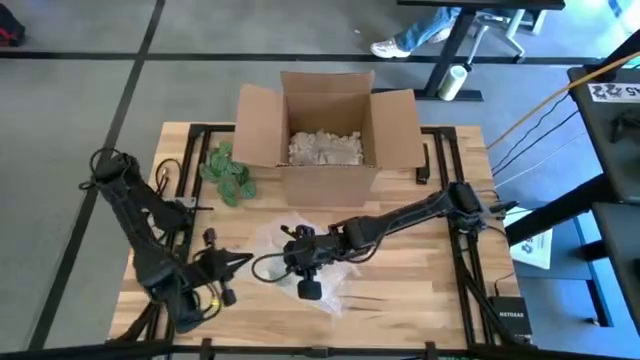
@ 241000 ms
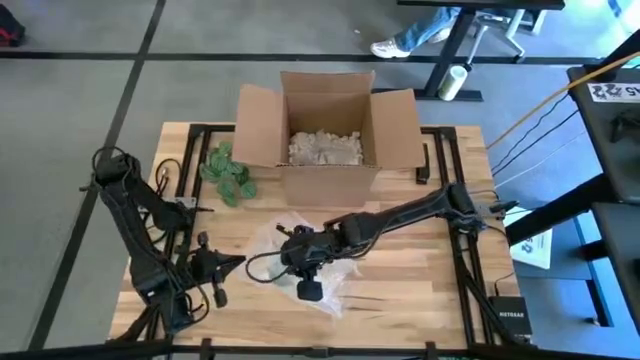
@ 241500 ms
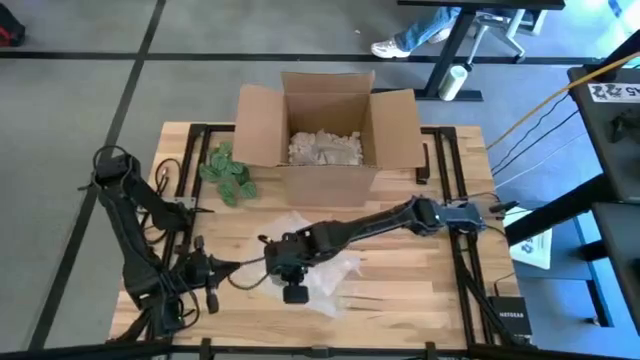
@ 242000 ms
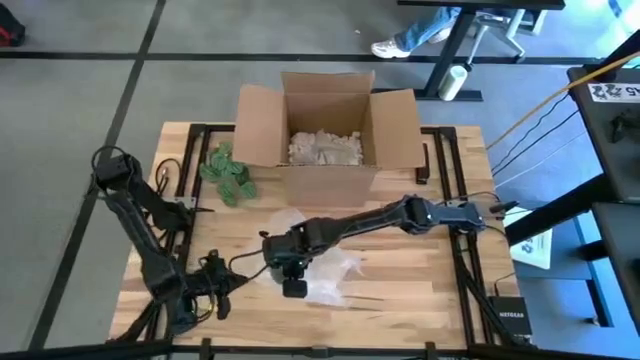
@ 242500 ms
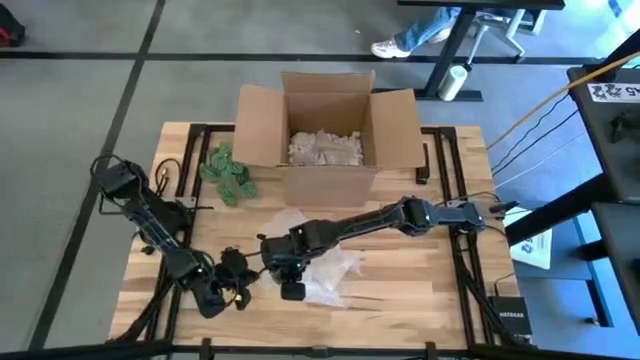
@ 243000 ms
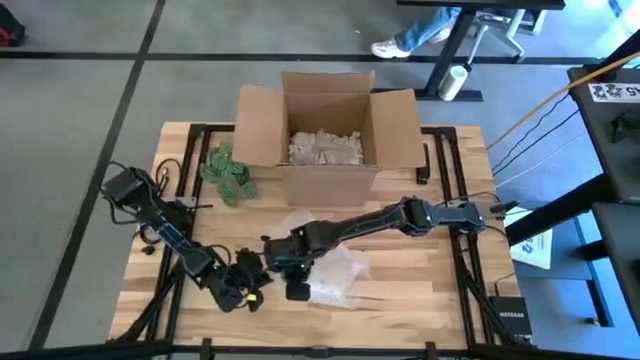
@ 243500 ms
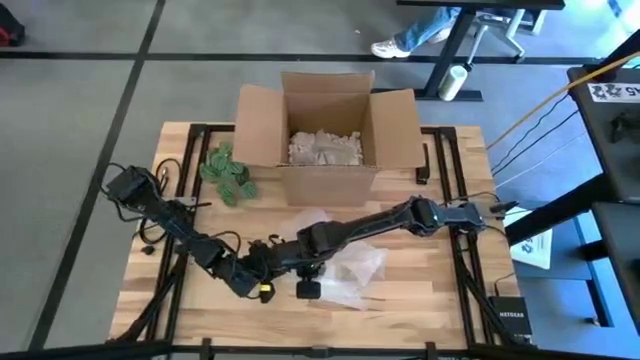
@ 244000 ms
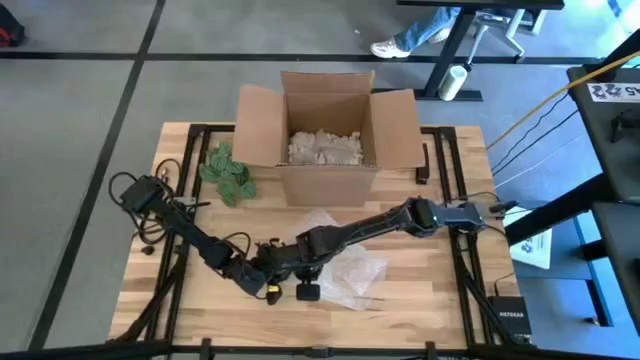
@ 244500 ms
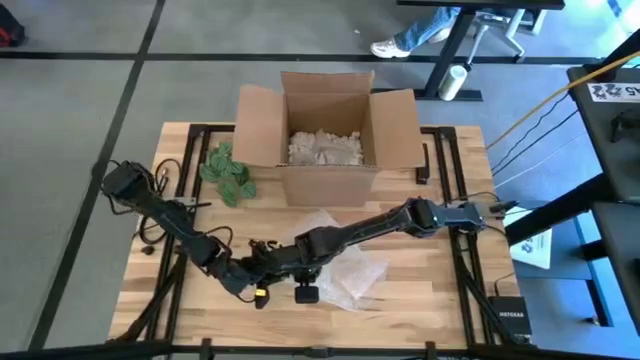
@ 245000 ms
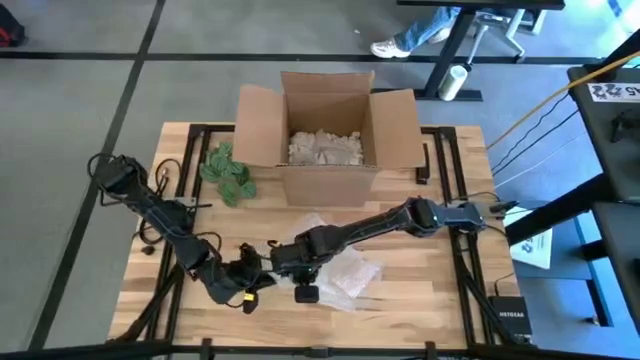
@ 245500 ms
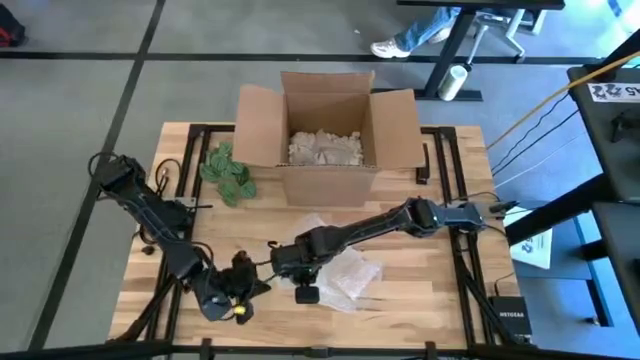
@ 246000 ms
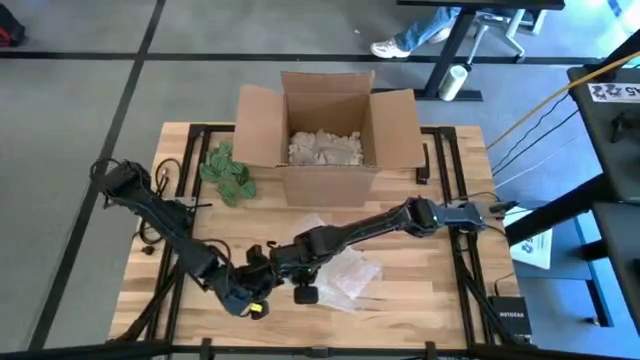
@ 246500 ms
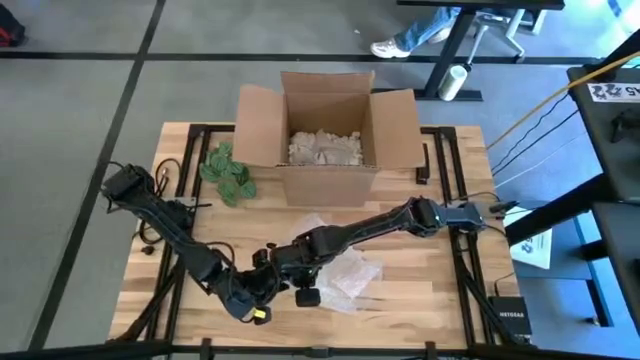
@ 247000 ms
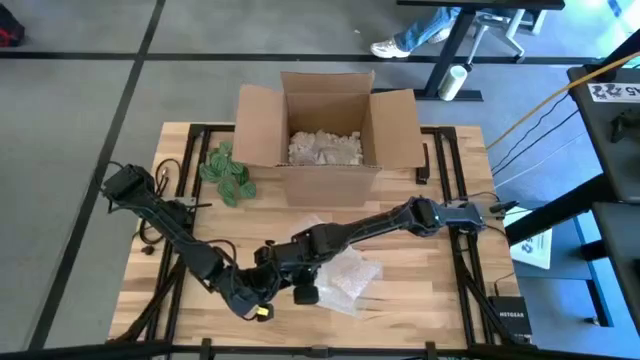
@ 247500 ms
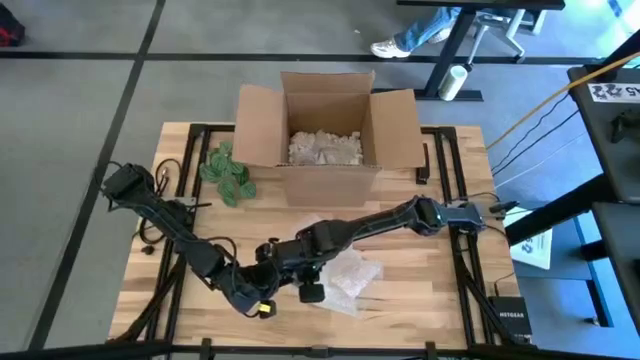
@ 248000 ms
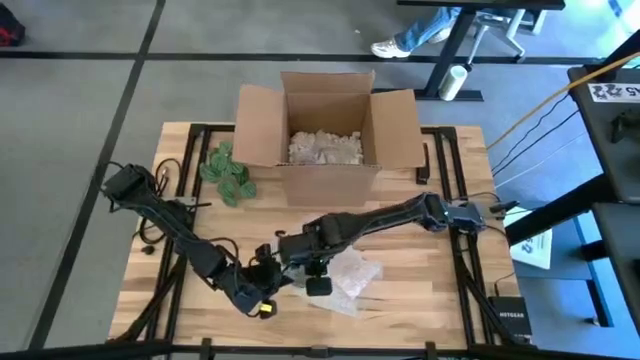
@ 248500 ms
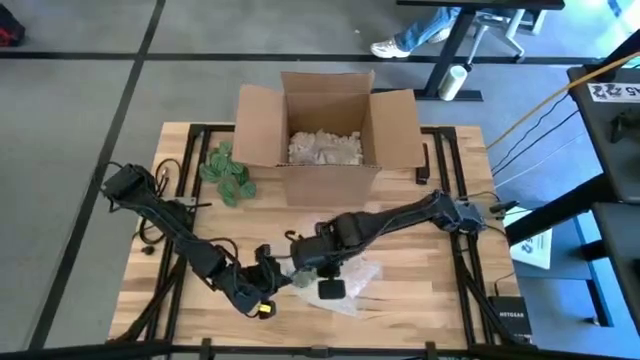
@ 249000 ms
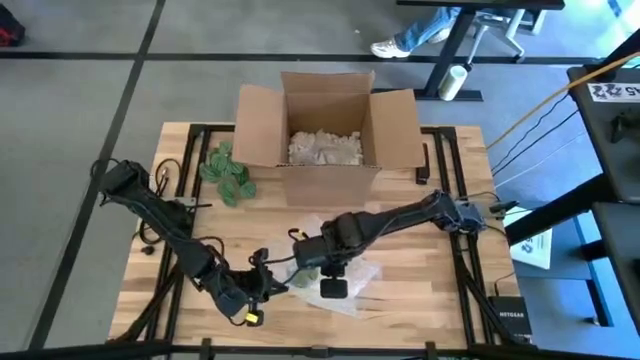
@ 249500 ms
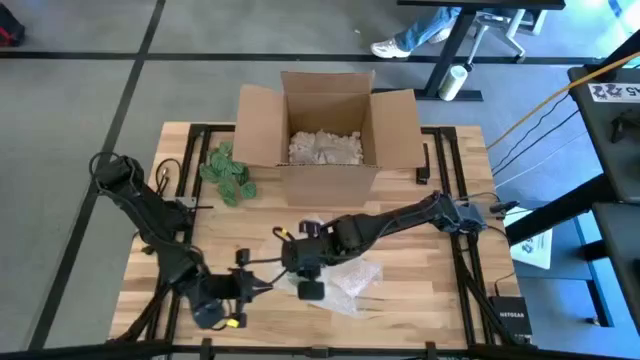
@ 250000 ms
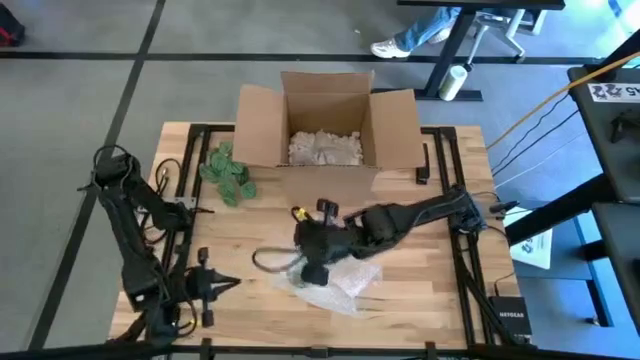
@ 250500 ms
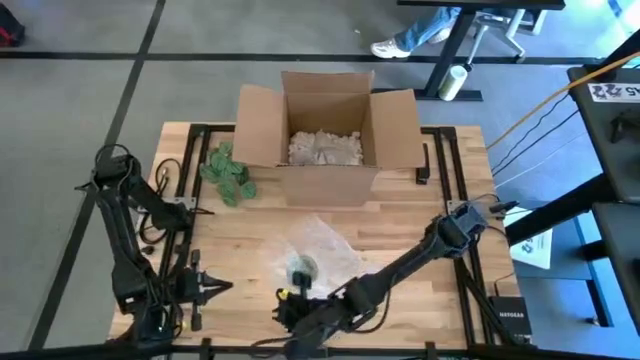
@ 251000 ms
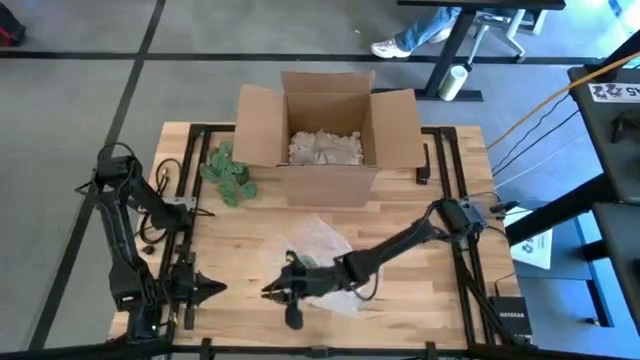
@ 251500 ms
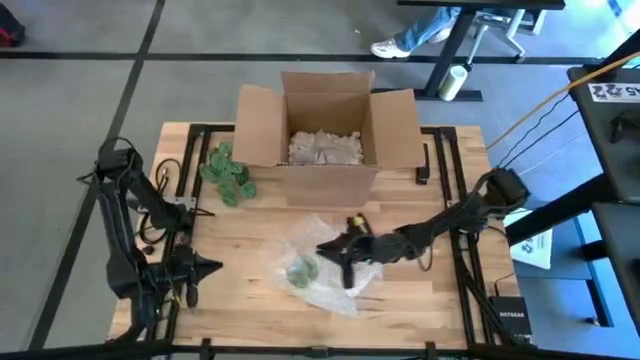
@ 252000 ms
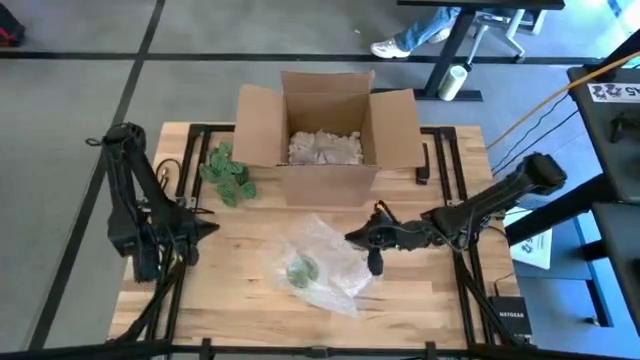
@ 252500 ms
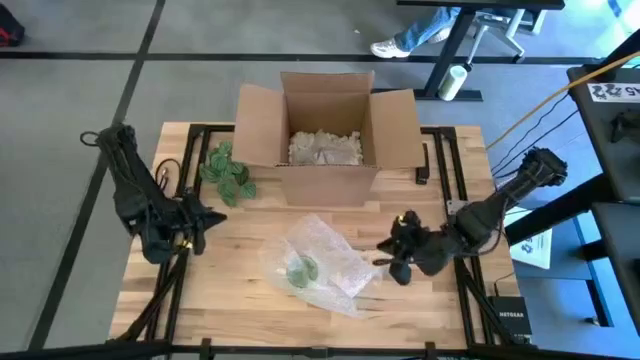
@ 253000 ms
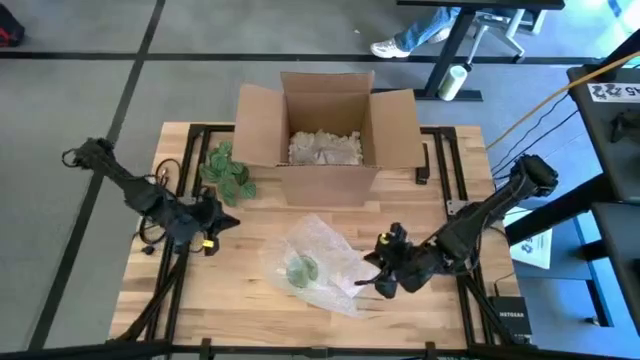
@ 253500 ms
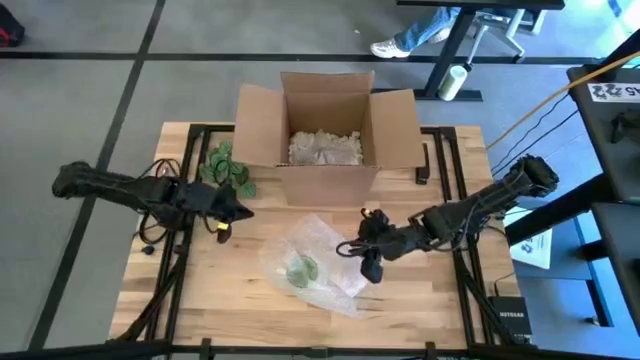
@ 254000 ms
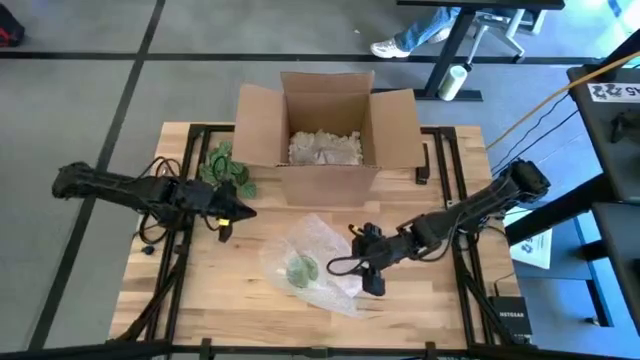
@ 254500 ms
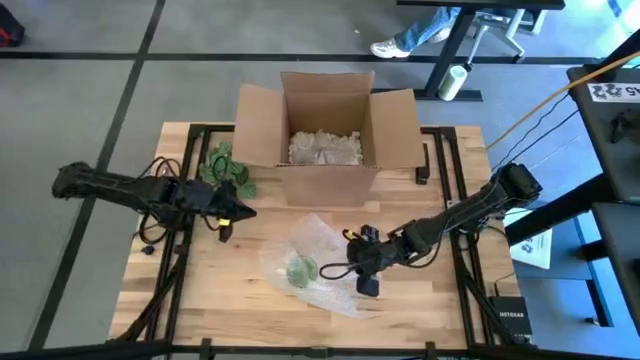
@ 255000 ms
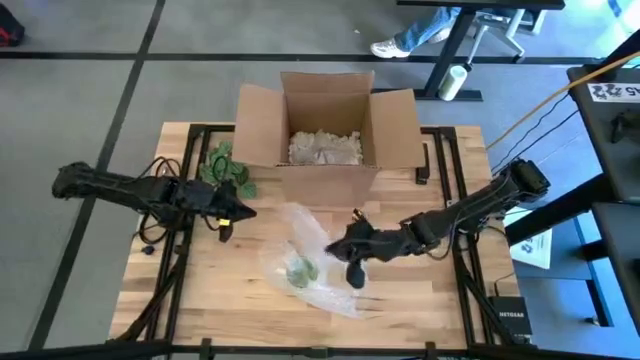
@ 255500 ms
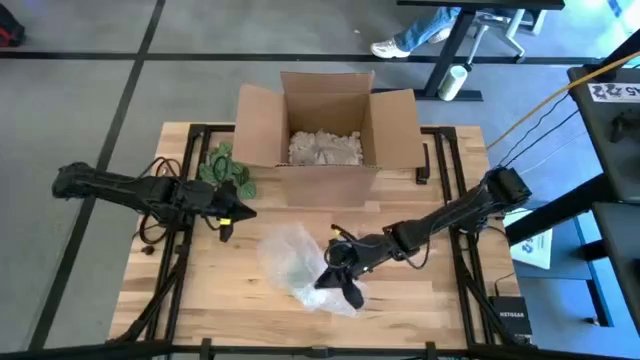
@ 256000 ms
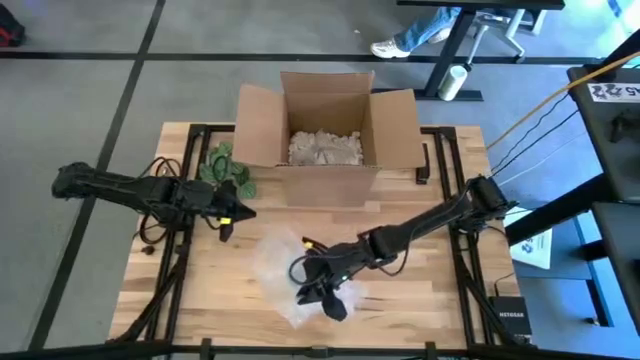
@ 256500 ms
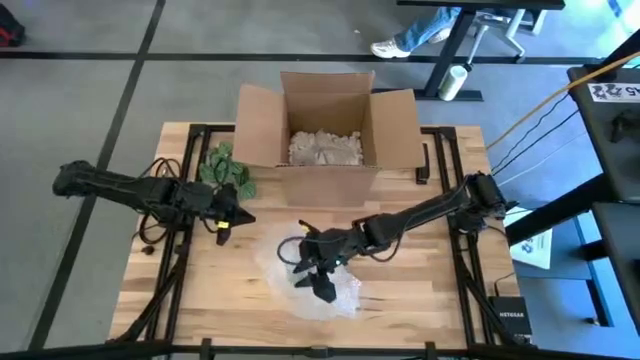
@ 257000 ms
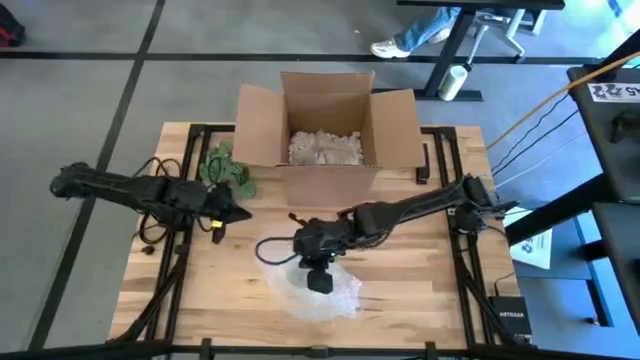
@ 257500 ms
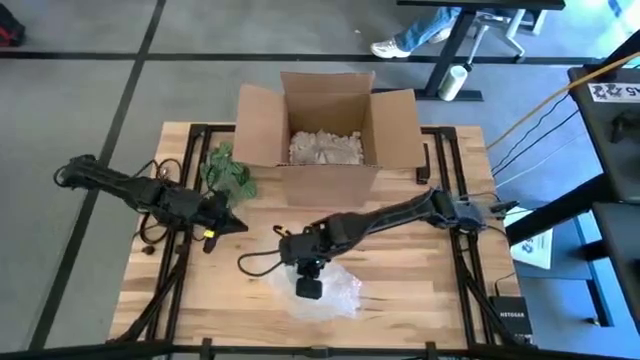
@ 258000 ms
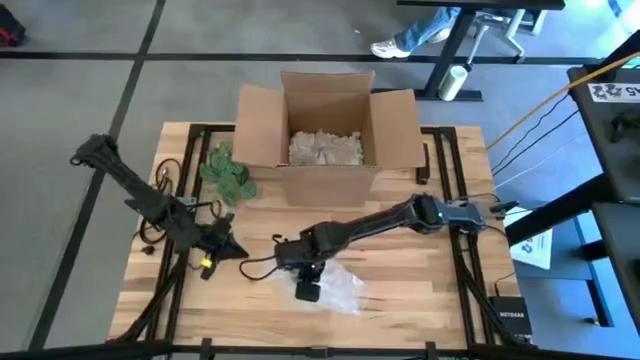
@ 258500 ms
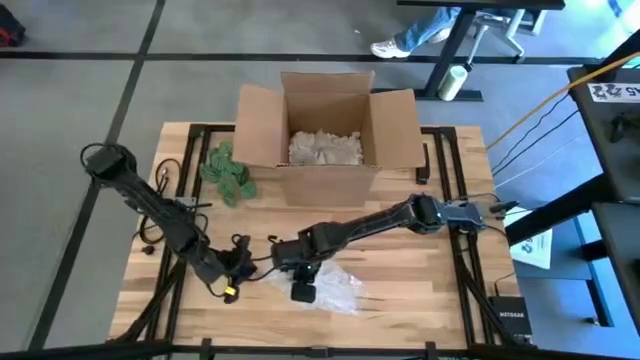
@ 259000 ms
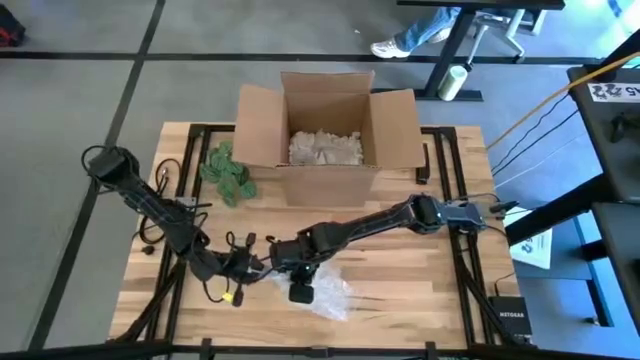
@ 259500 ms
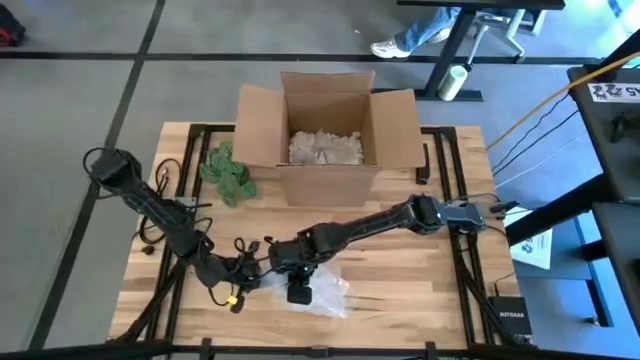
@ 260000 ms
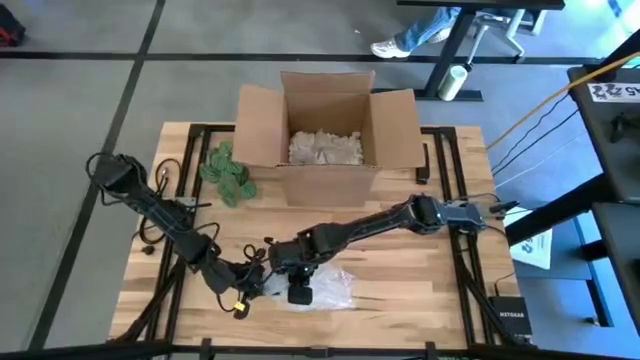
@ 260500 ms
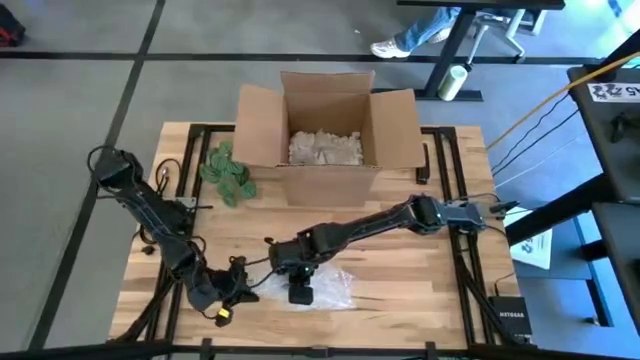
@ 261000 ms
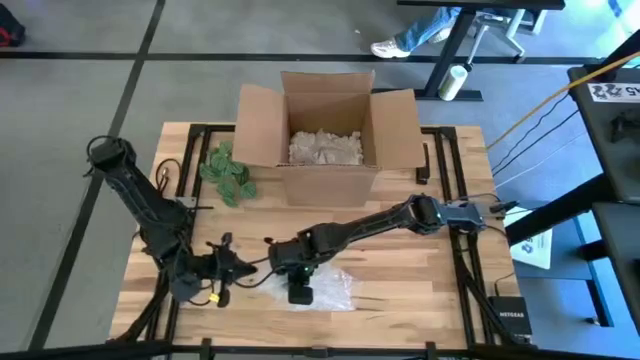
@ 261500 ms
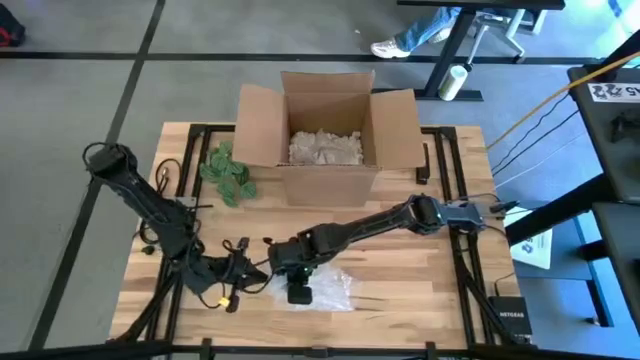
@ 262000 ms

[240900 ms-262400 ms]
Task: wrap mug
Wrap the green mug in bubble wrap
